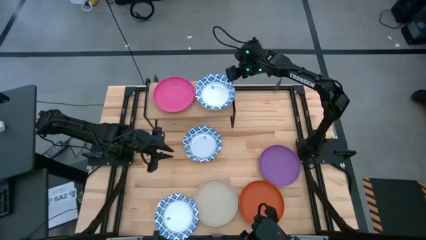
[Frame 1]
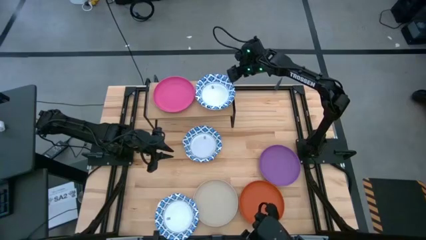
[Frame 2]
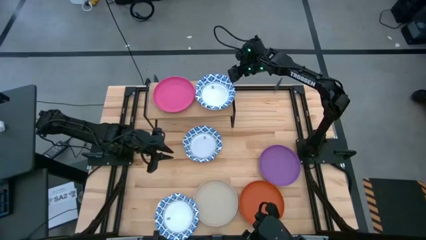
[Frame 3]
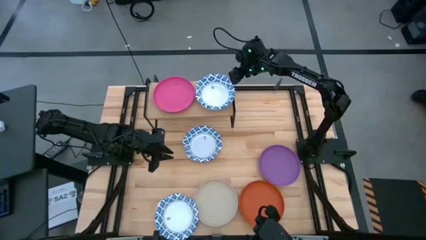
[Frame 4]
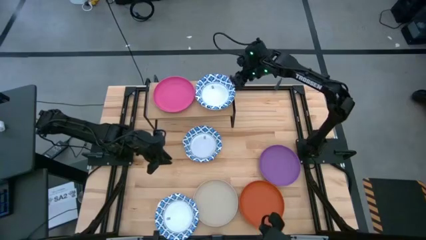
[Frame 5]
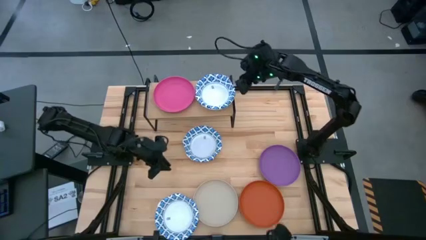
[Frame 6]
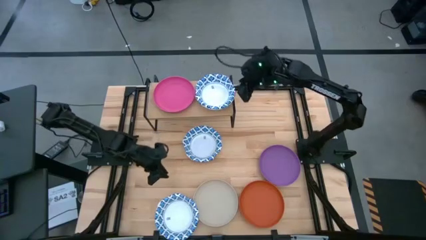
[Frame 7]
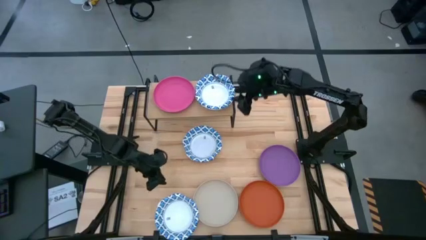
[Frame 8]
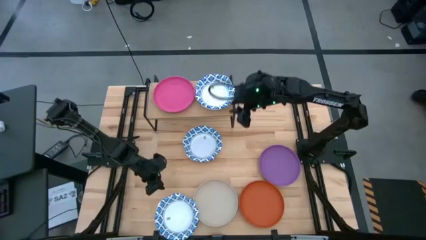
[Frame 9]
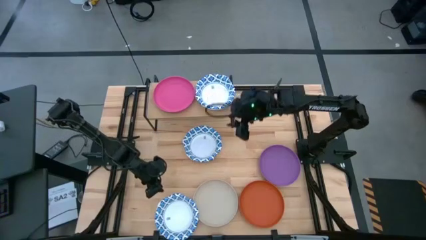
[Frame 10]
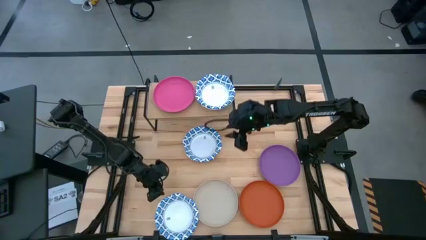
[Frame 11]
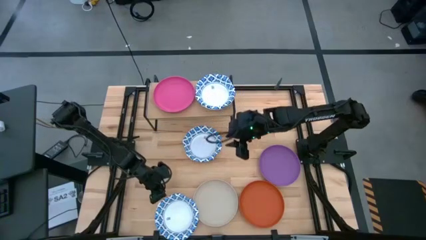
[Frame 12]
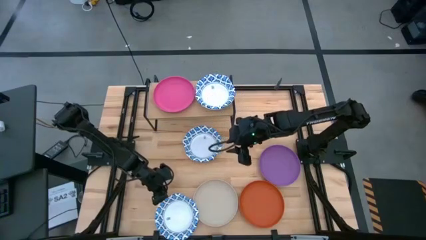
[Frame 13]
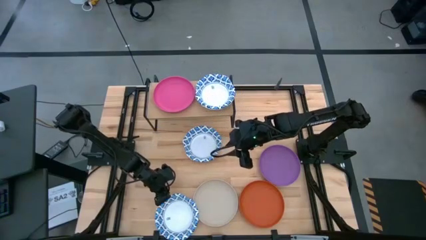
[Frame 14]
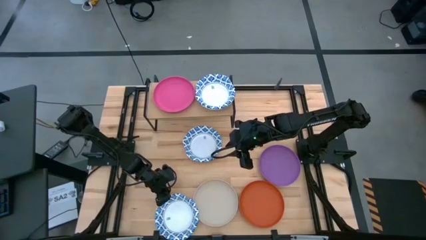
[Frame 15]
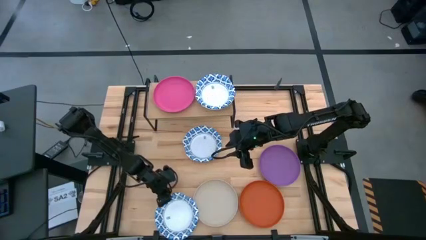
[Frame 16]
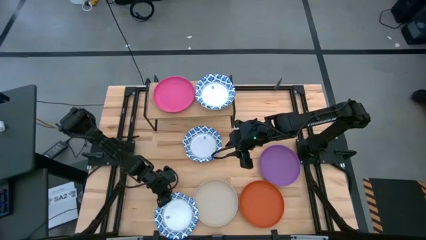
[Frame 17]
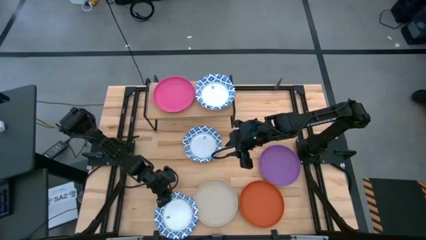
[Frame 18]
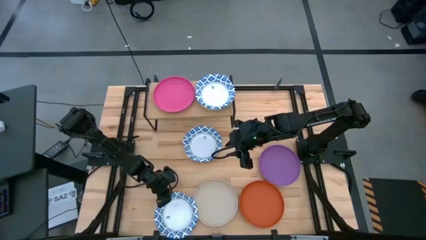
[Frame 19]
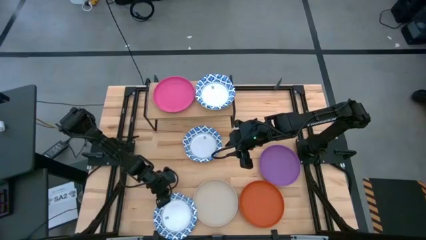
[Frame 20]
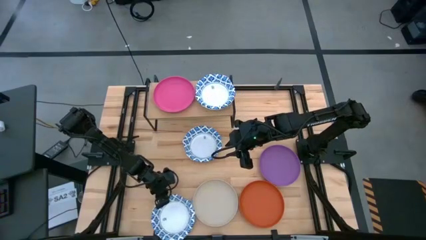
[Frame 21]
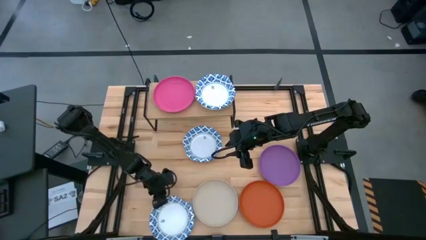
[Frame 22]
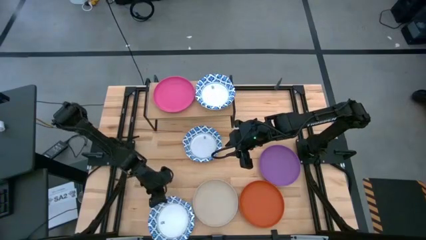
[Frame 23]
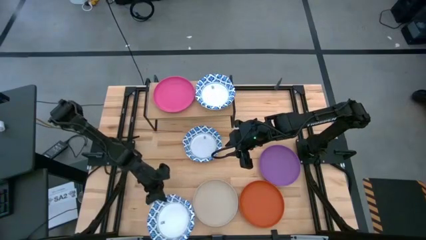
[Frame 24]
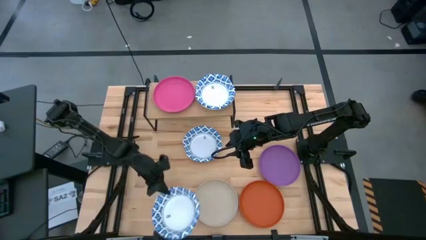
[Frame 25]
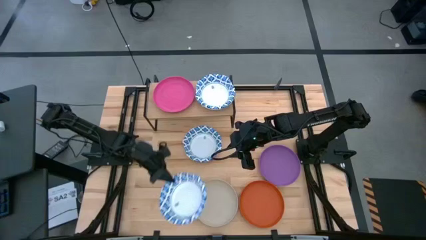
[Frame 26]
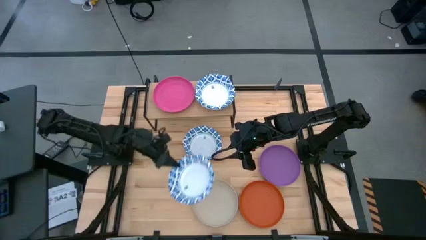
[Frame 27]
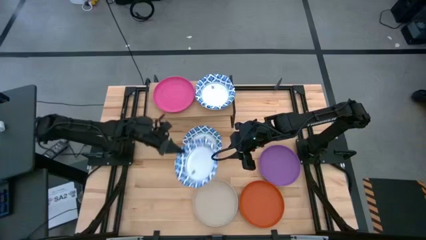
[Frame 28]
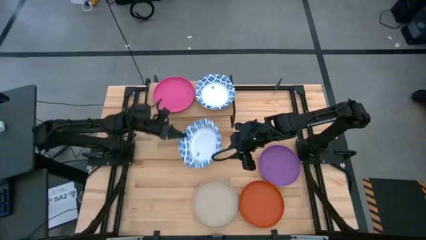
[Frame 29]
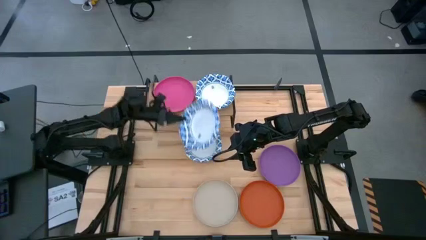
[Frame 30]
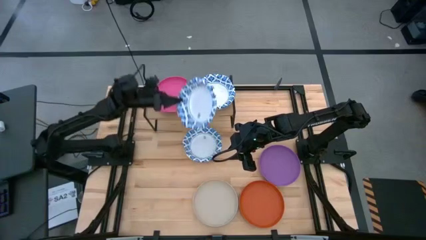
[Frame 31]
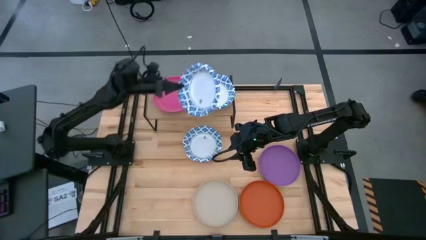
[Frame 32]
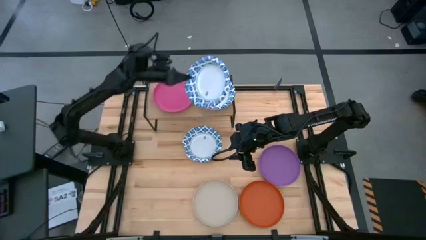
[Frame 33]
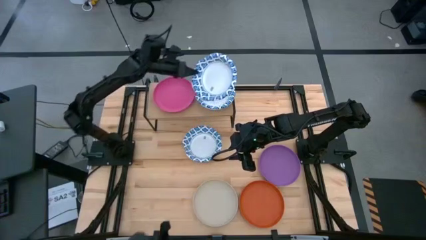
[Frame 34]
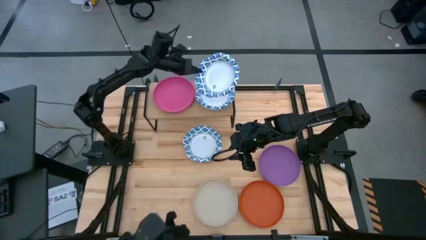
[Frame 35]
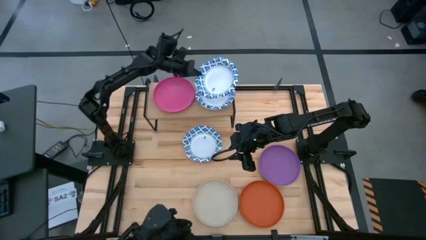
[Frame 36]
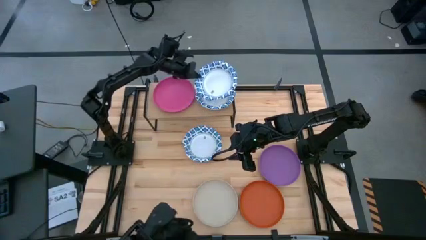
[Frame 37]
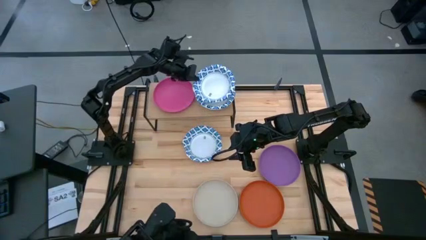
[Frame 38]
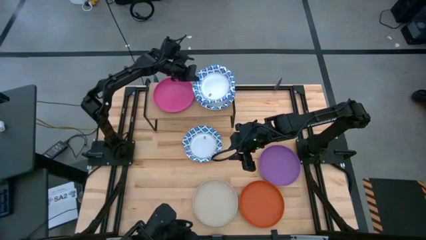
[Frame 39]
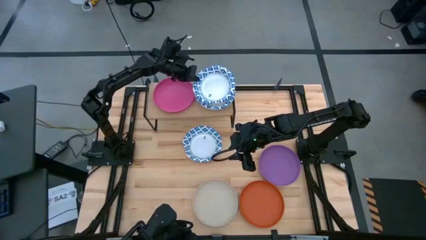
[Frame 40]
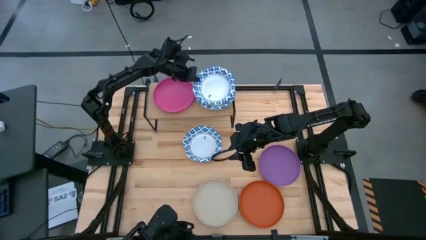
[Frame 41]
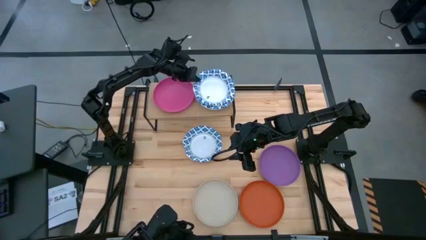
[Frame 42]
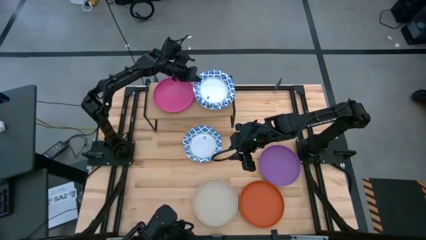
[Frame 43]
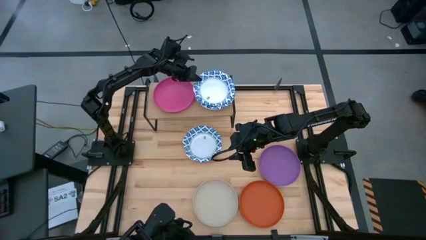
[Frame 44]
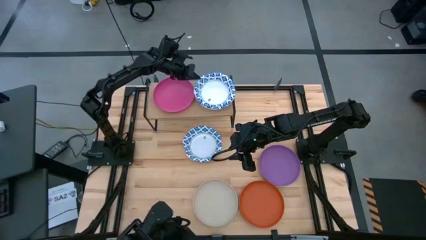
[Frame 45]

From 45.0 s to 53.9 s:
Task: Place and stack plates onto a shelf
Stack the bottom white patterned bowl on top of the other white patterned bowls on the shelf

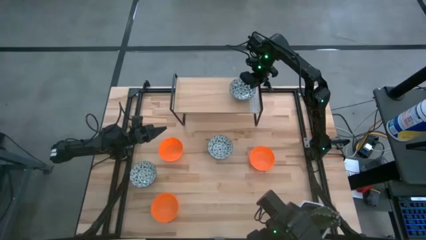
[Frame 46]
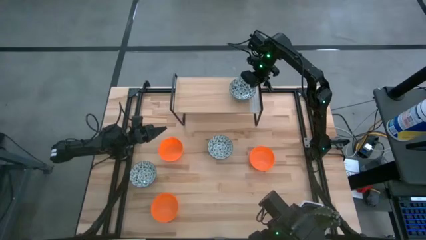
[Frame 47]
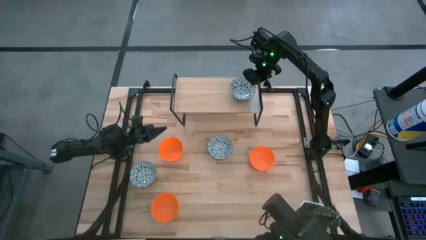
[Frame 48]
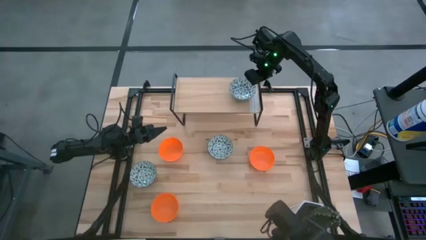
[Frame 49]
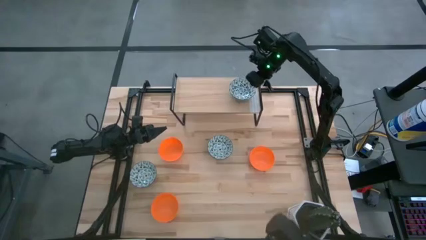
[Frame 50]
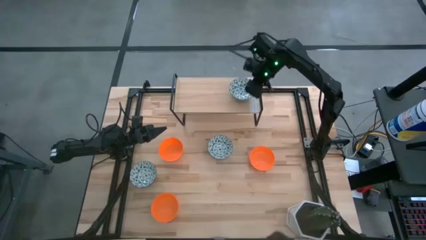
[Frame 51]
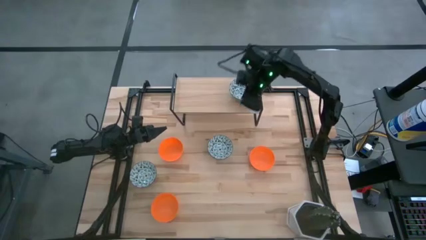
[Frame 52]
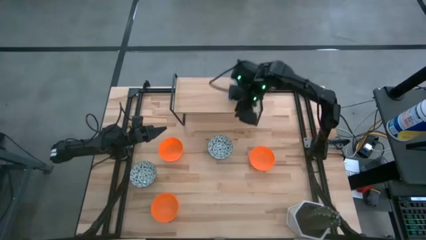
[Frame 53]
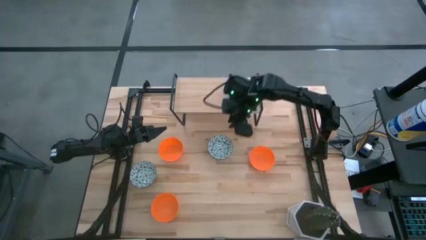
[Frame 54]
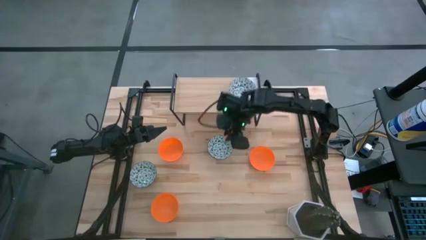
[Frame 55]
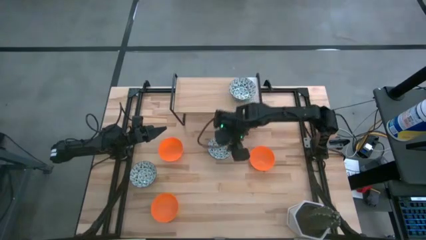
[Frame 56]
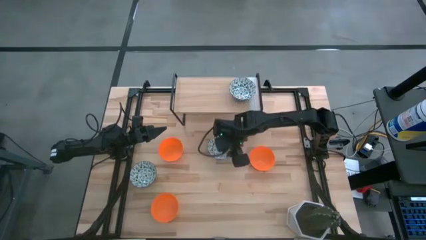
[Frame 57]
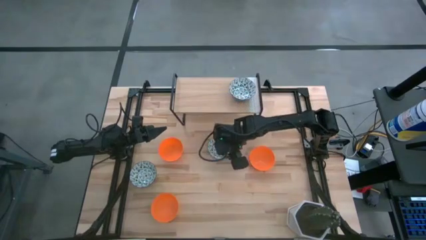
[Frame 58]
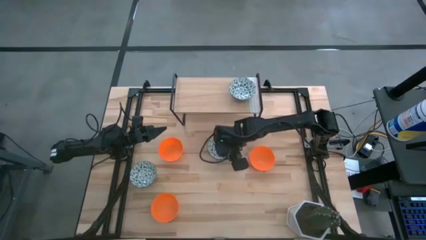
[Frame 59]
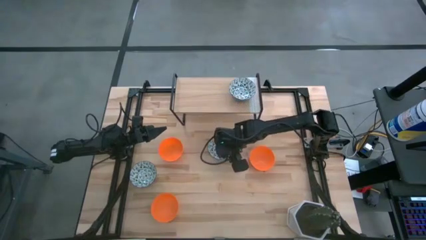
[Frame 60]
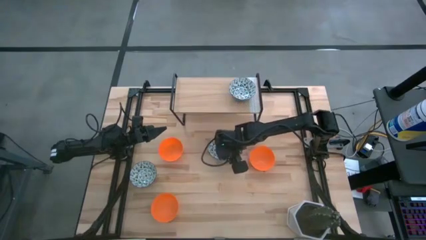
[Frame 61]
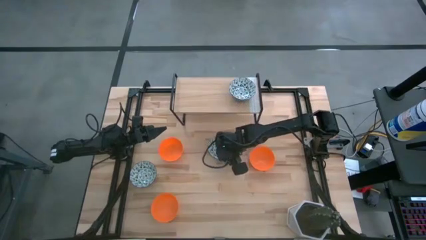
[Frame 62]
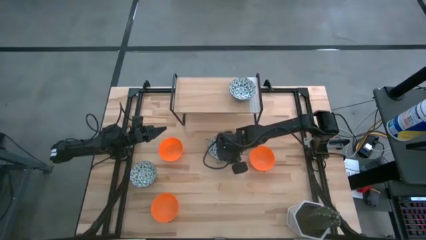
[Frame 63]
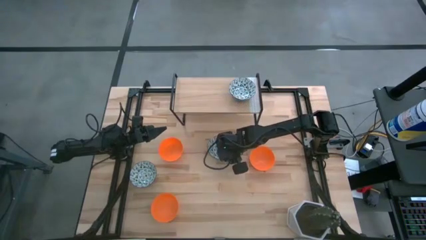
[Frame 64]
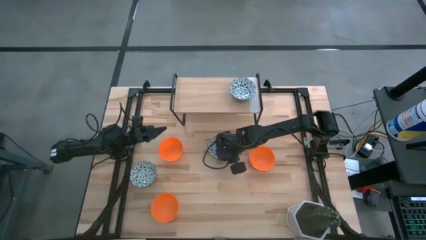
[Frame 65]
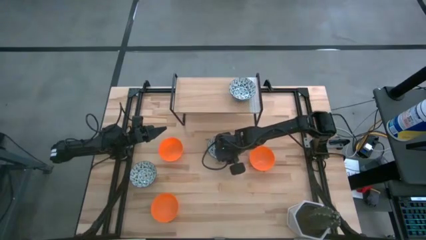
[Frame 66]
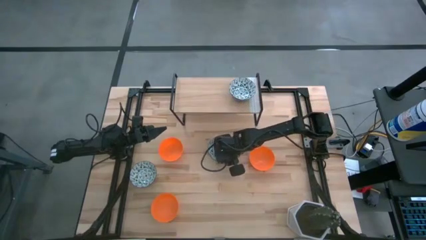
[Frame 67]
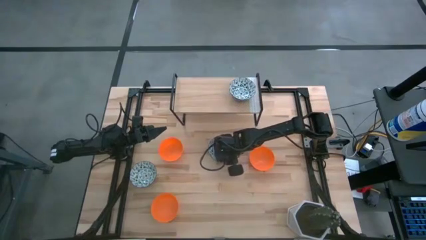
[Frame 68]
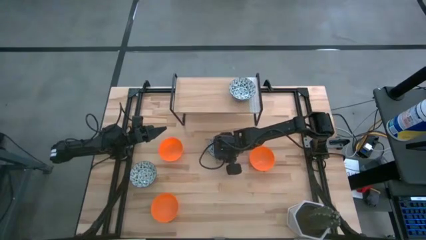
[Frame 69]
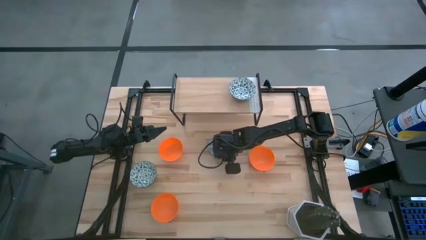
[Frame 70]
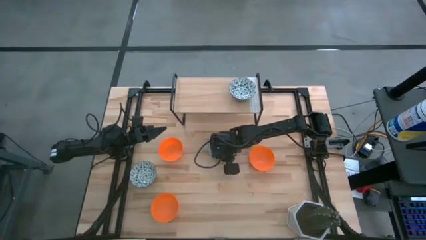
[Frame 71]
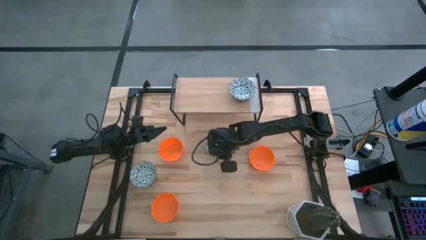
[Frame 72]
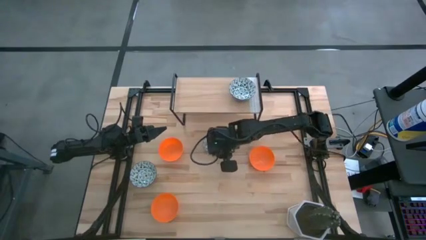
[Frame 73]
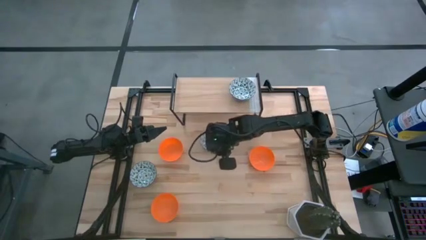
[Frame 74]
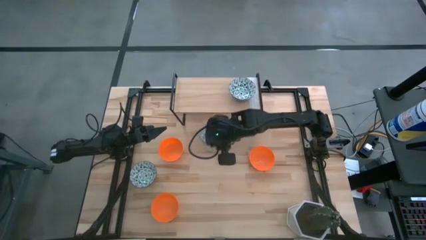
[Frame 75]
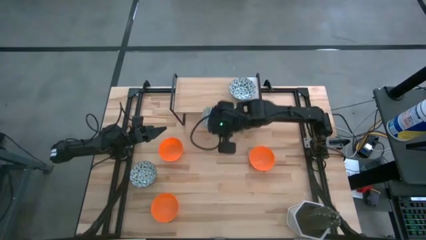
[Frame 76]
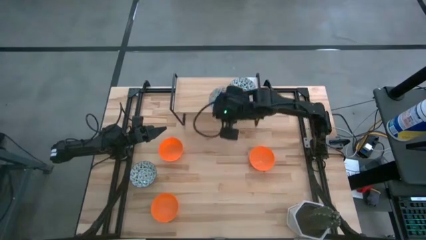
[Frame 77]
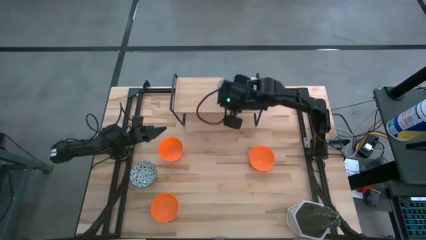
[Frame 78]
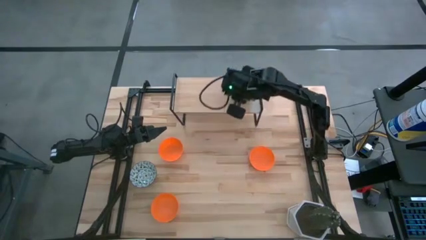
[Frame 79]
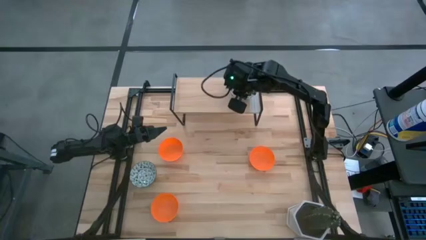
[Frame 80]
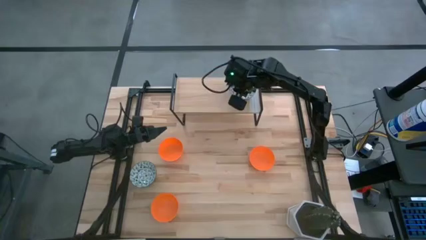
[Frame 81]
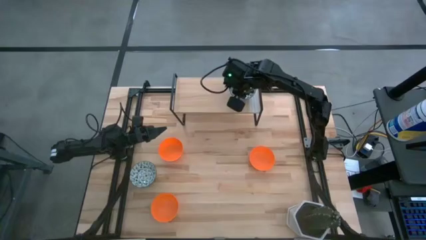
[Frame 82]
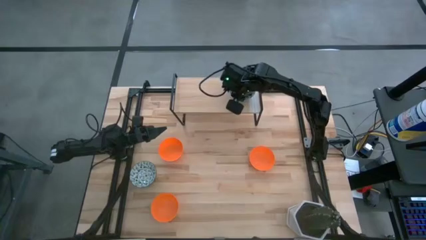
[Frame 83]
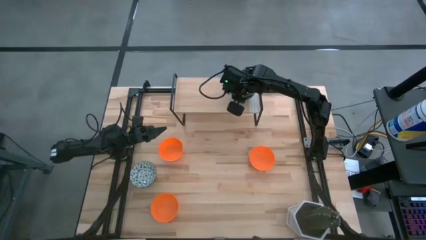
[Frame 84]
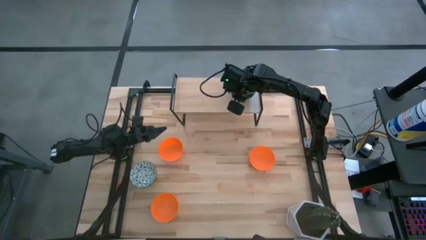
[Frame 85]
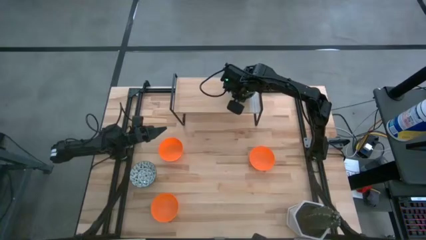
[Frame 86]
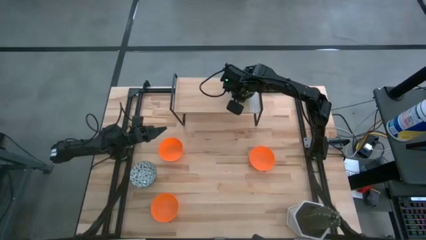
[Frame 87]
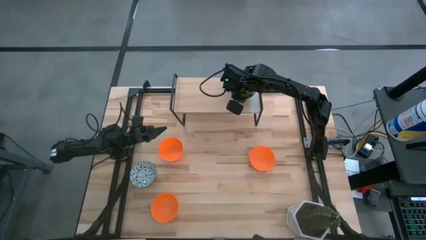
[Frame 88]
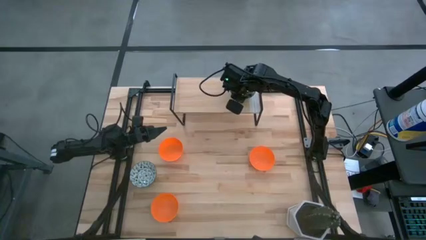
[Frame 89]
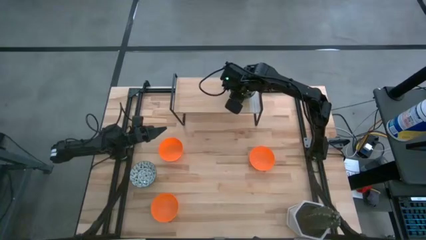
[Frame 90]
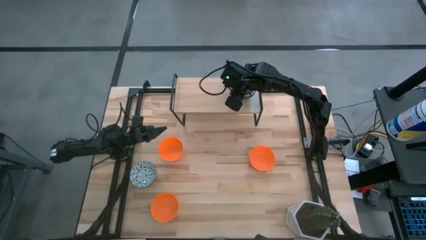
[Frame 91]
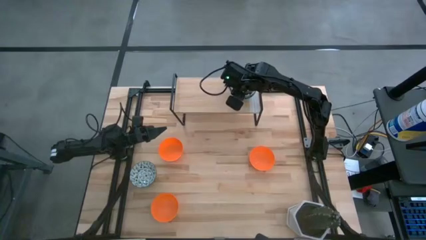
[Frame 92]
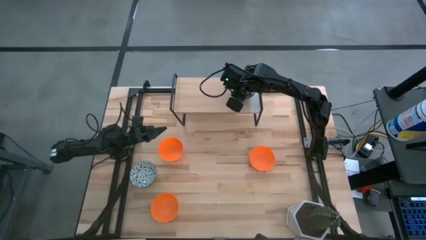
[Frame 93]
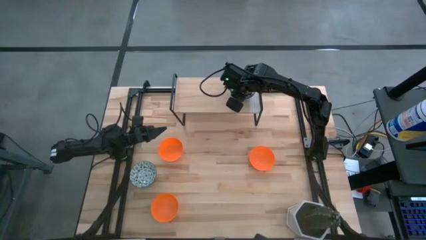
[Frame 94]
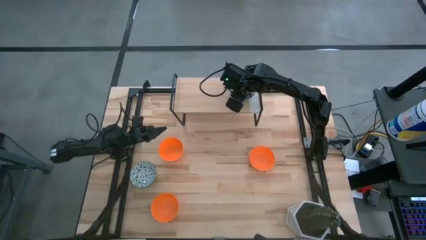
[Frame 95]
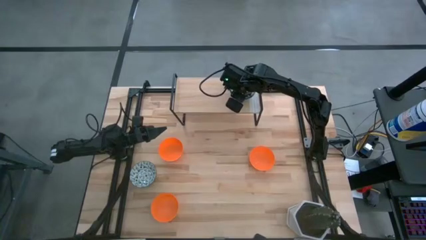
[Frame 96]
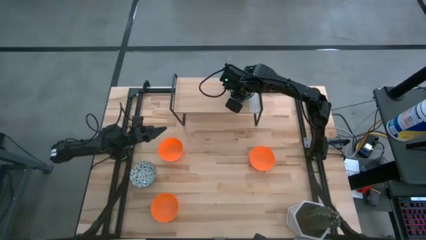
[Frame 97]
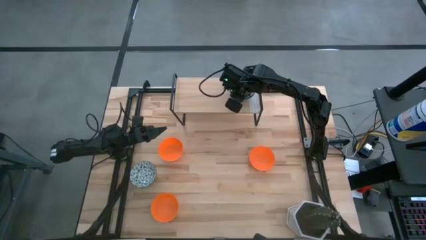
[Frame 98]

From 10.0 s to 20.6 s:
Task: Pick & Place Mini bowls
Stack the top white patterned bowl on top of the white bowl on the shelf
